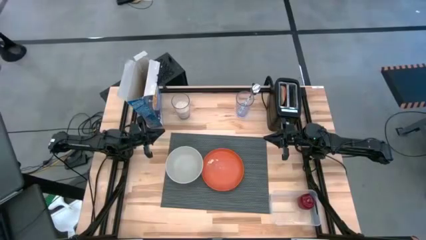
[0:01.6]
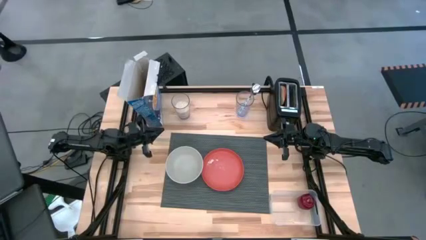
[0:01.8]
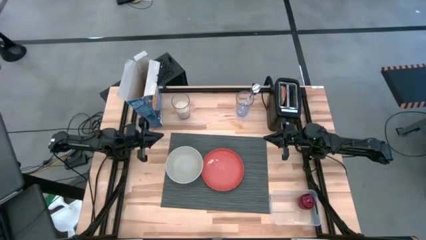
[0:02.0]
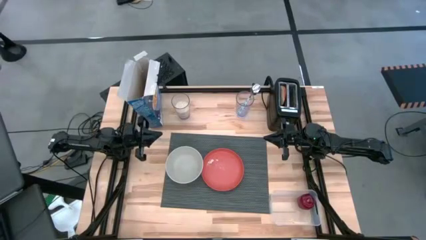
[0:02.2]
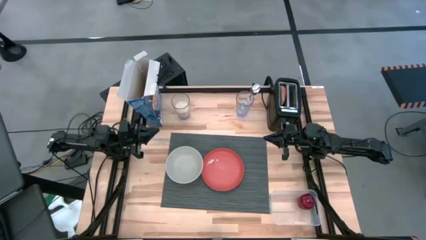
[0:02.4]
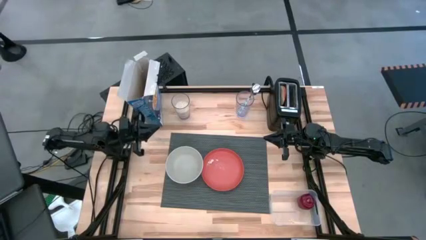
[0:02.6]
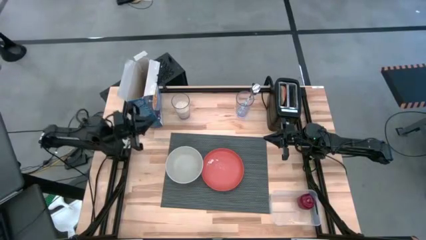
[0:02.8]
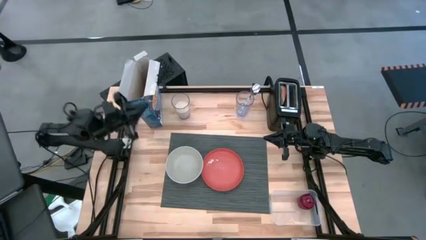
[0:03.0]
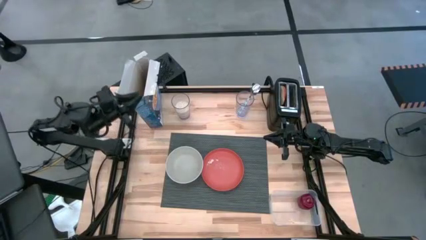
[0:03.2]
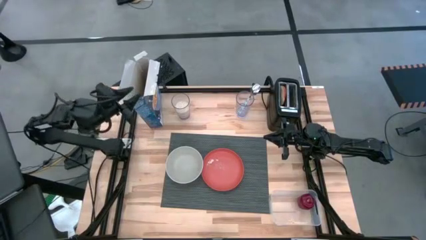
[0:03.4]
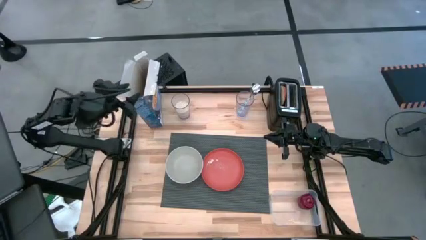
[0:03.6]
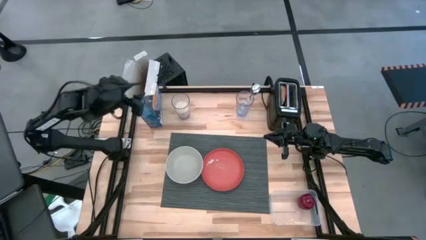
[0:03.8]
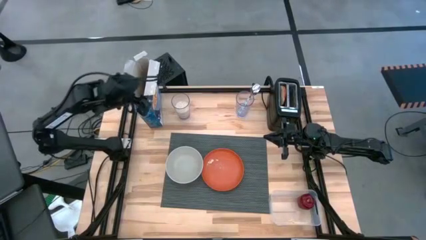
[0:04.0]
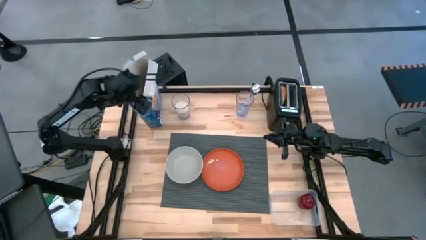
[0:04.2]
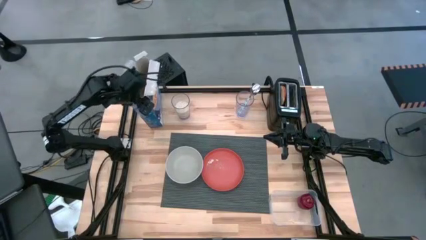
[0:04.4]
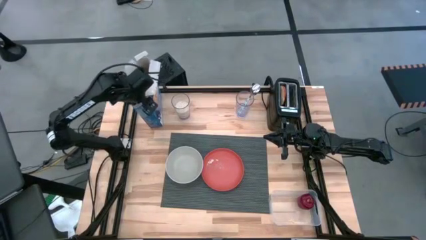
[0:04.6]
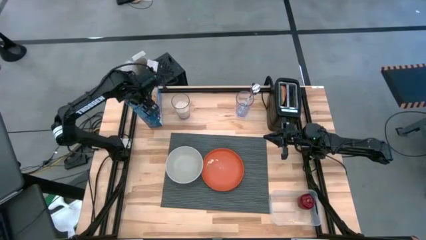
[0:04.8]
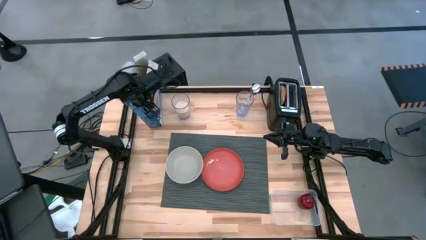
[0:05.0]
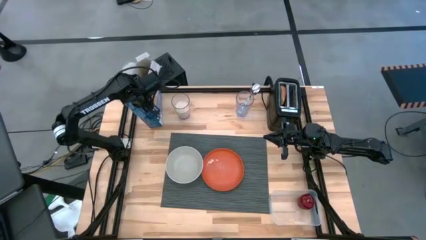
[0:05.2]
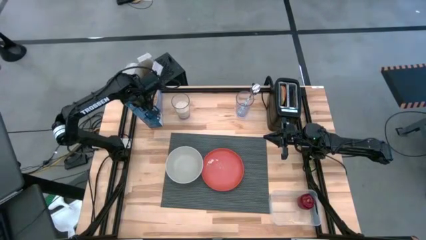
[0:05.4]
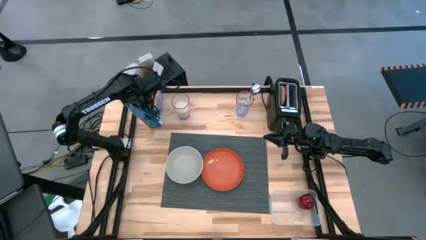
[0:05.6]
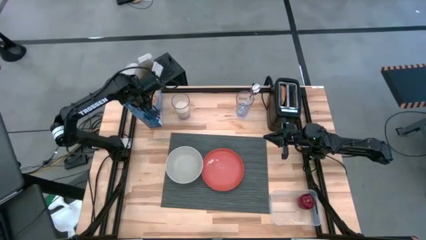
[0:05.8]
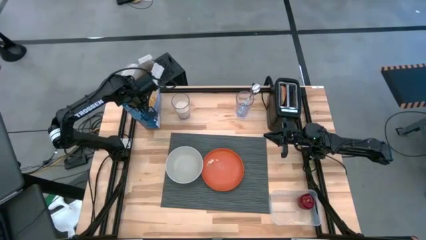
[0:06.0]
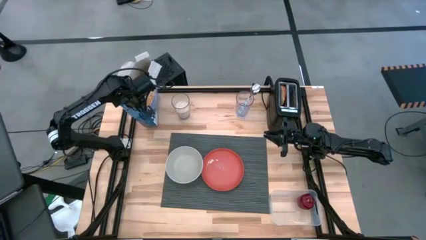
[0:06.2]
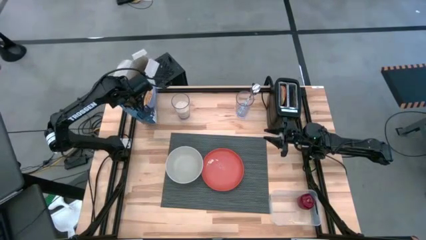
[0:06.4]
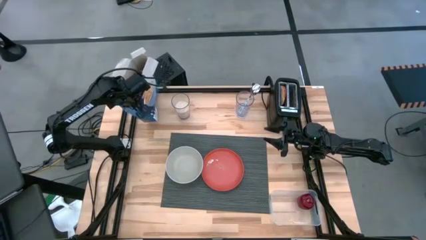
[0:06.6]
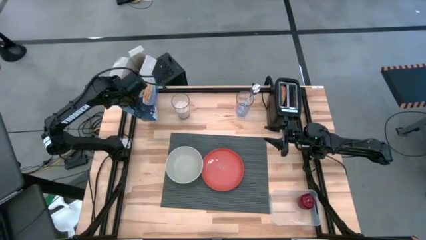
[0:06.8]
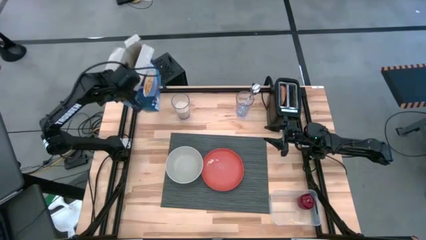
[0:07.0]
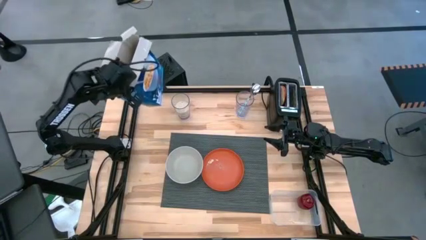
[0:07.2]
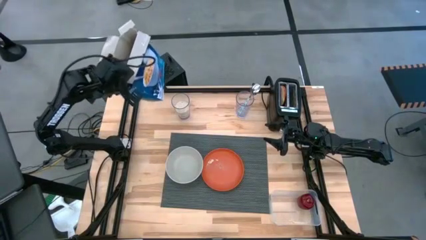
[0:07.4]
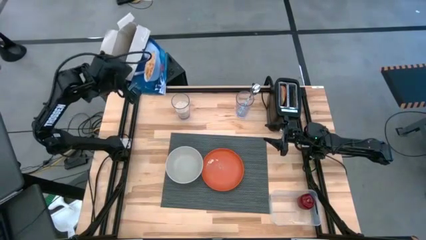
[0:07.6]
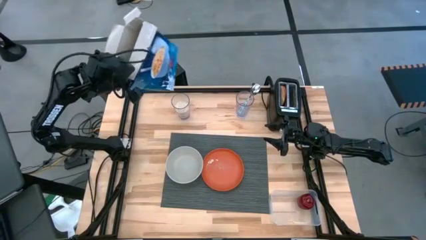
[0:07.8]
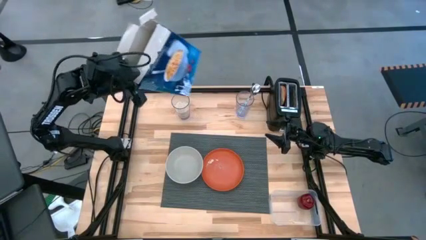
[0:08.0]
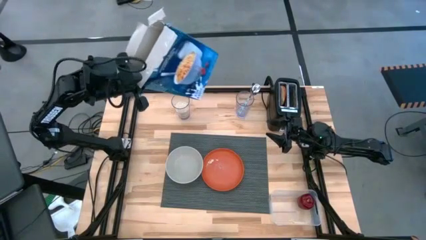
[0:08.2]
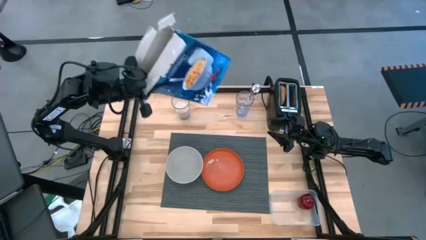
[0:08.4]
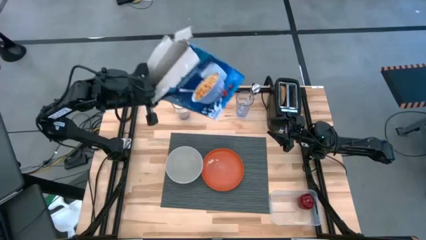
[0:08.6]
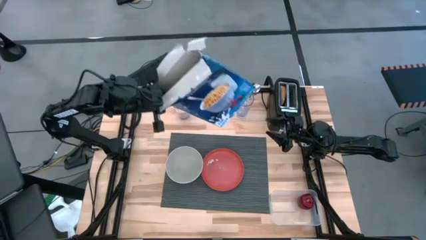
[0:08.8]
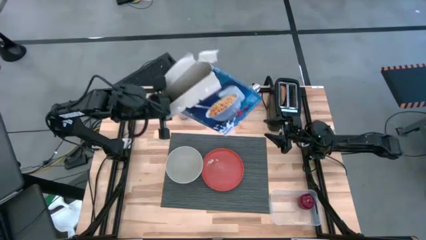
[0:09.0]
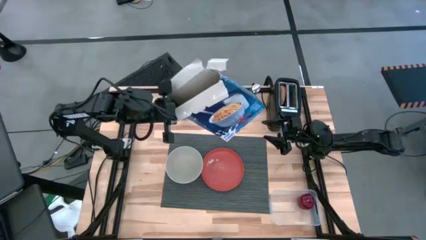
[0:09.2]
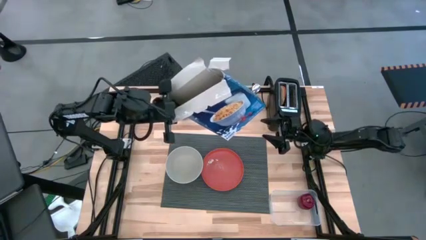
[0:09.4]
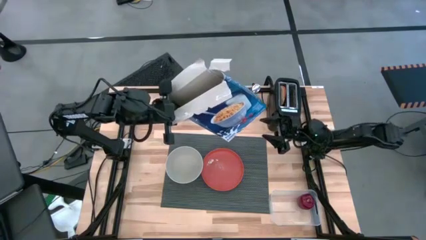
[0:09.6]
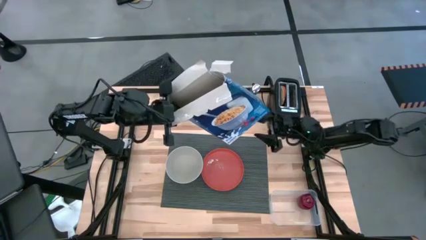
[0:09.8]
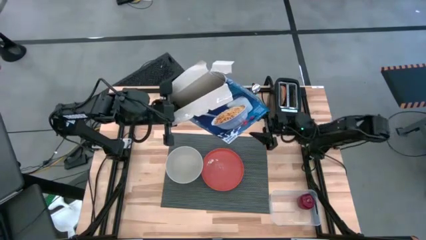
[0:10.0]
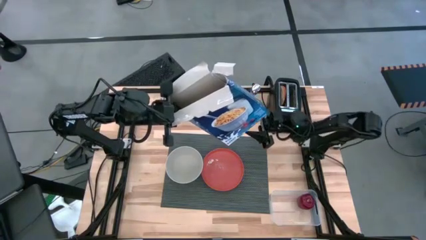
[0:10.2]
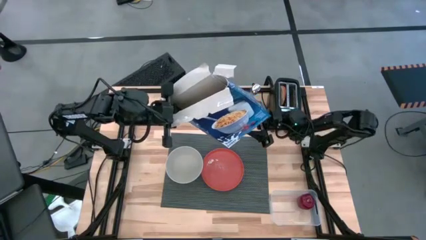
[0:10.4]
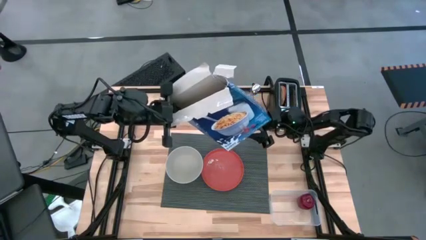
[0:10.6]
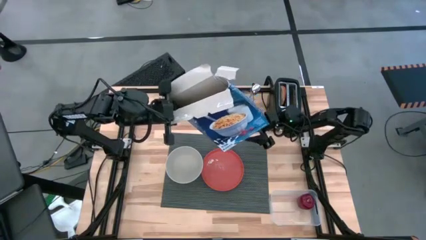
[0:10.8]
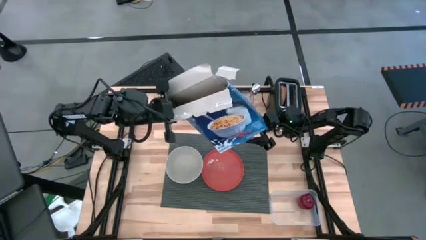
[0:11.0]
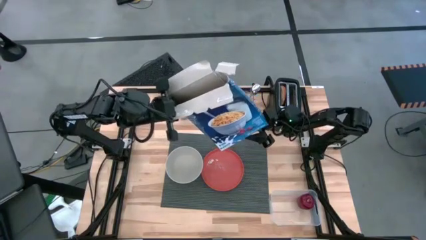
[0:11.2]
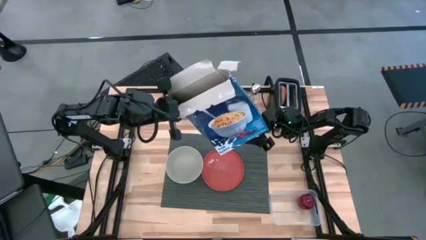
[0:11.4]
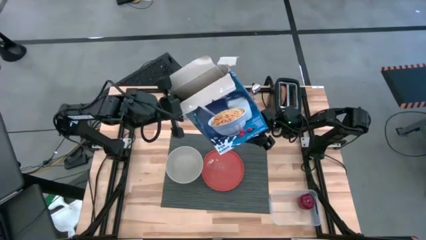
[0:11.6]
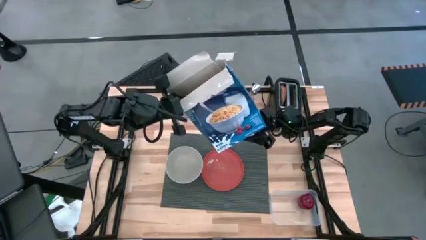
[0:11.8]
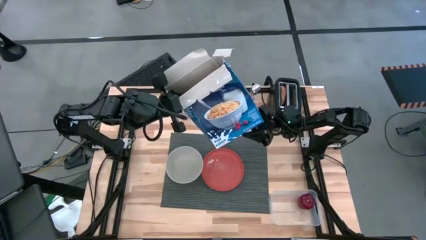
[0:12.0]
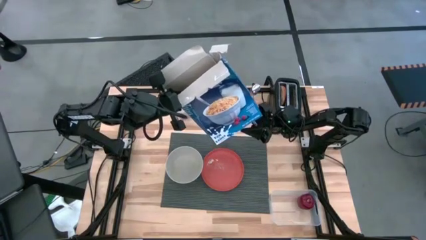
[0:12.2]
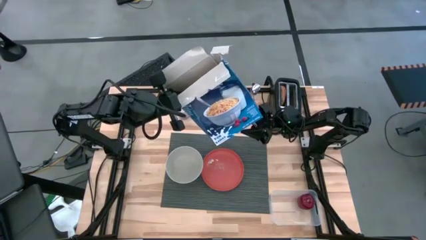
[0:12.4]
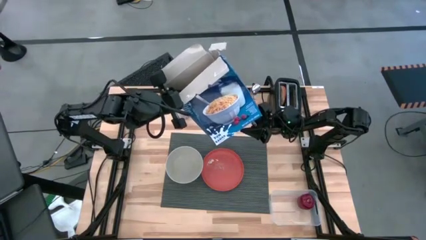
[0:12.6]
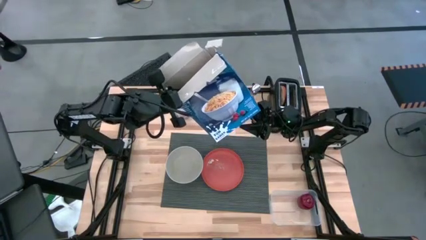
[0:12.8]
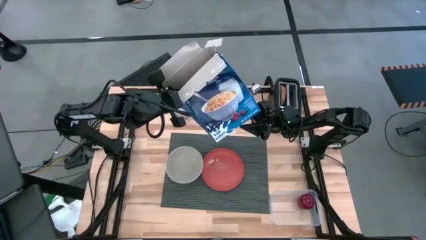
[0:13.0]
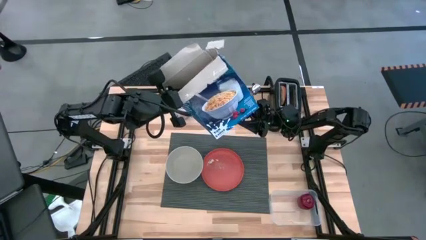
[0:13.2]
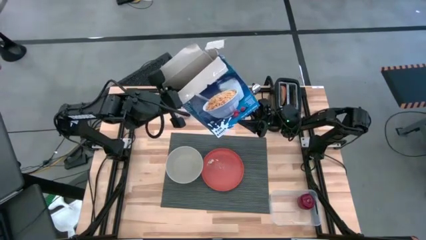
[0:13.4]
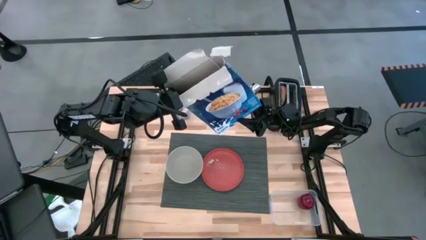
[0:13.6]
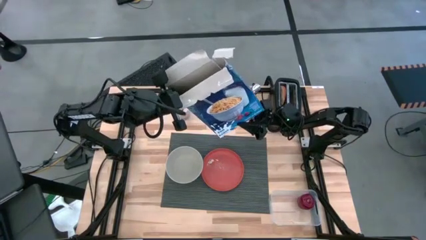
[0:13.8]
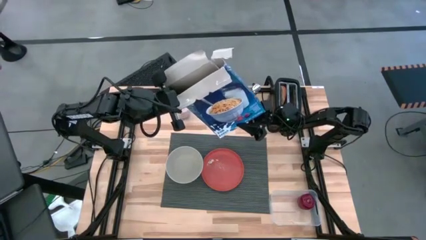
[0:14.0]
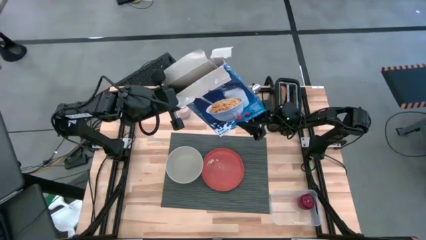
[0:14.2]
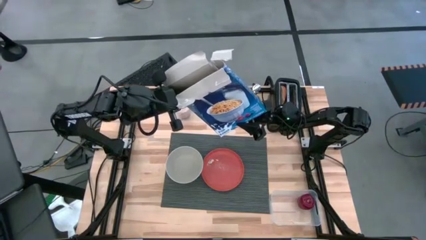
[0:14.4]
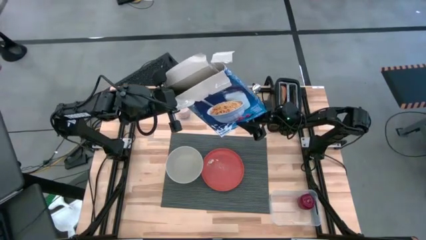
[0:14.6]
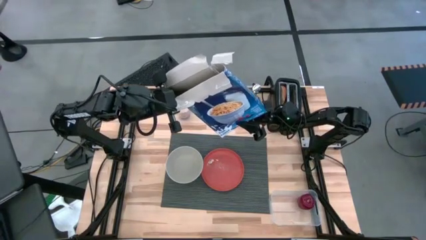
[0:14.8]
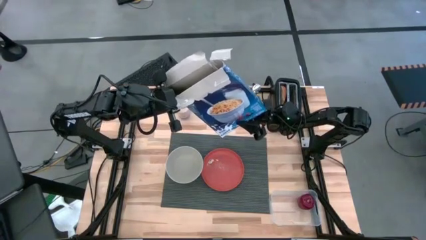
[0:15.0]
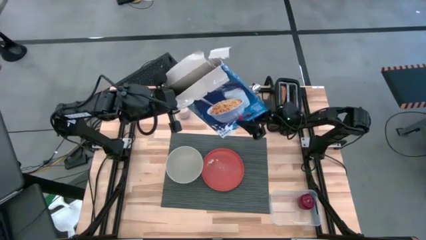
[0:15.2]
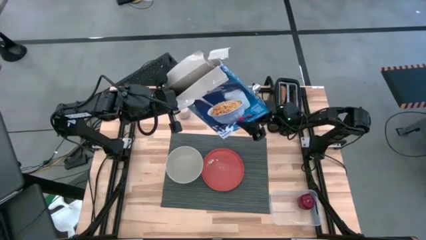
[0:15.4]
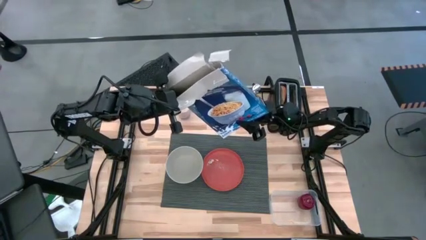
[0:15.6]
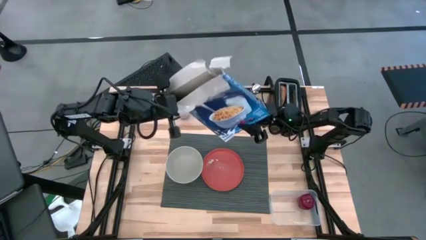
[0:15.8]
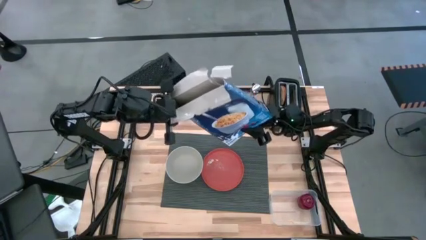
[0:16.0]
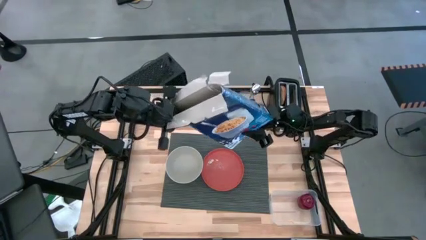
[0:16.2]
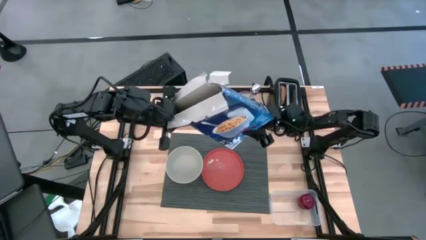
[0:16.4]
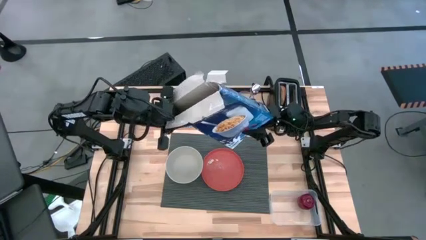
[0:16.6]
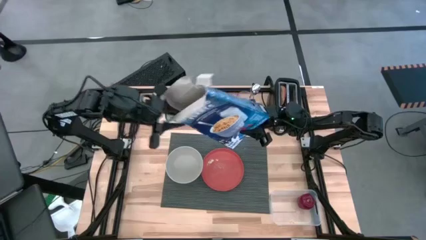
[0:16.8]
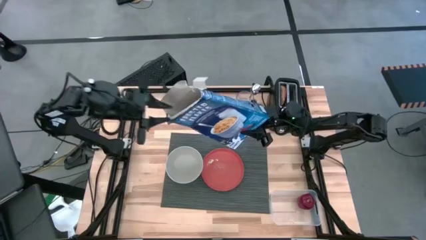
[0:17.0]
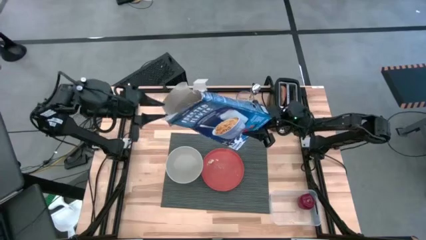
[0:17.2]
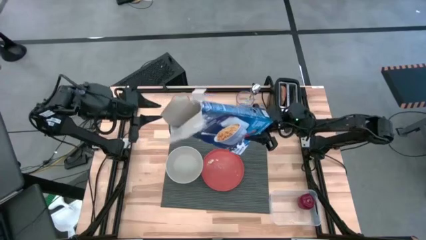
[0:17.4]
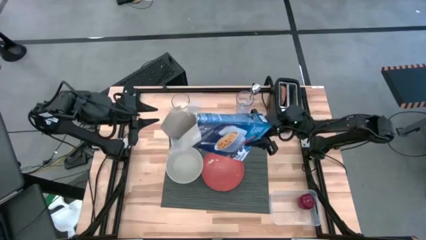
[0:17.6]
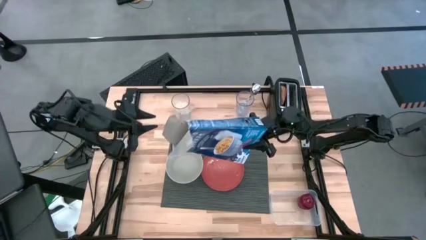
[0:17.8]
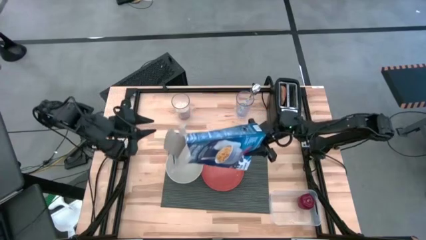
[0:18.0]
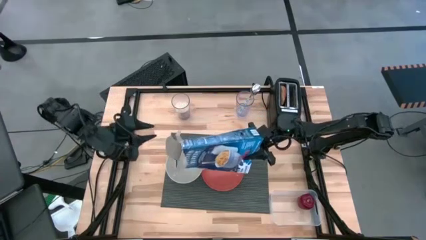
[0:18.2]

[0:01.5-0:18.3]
Task: Arrange a breakfast setting
Pour the cereal from the cereal box into the bowl
